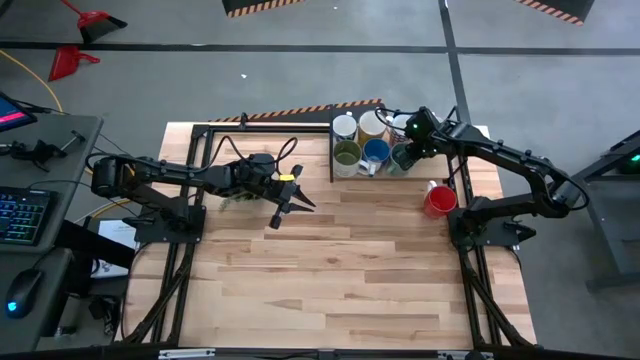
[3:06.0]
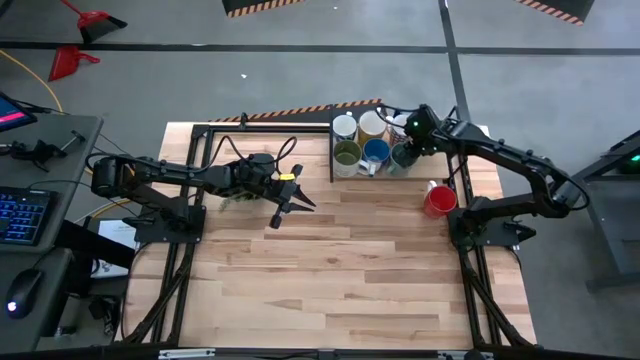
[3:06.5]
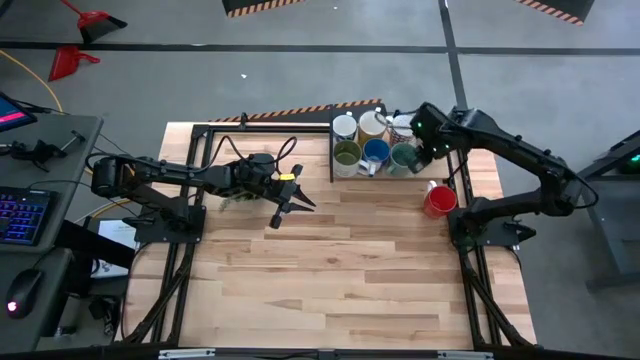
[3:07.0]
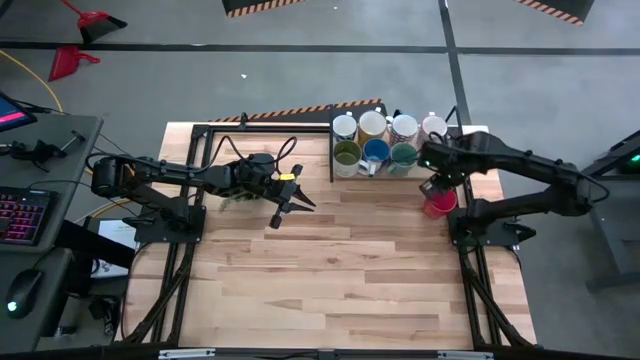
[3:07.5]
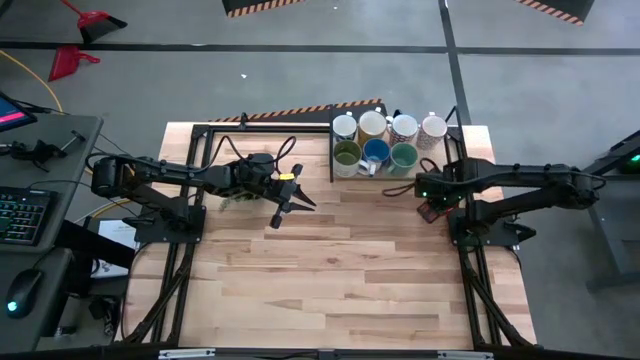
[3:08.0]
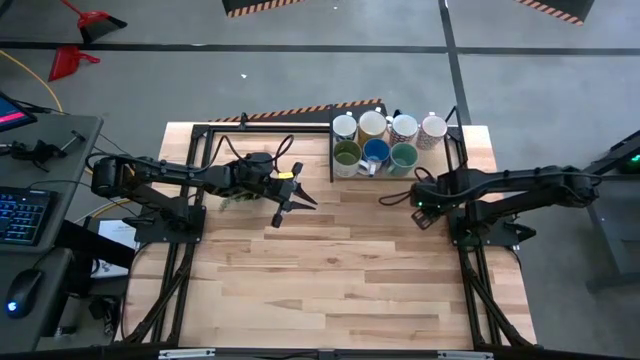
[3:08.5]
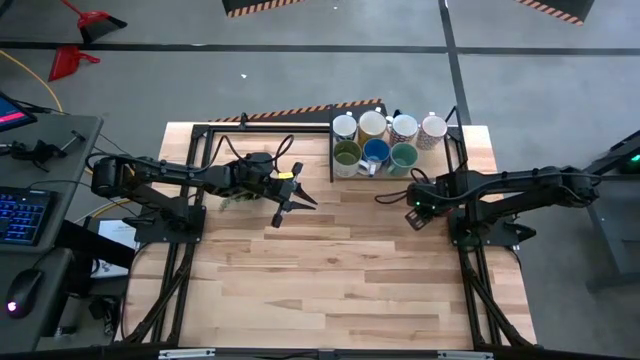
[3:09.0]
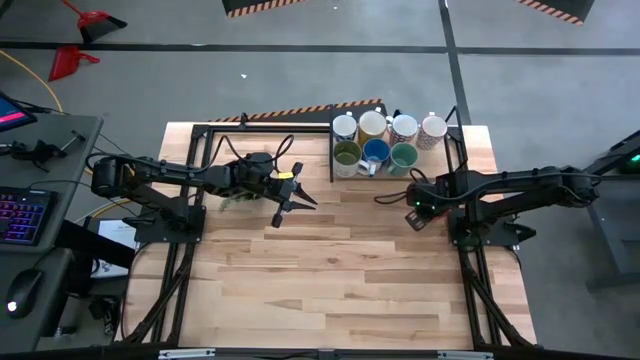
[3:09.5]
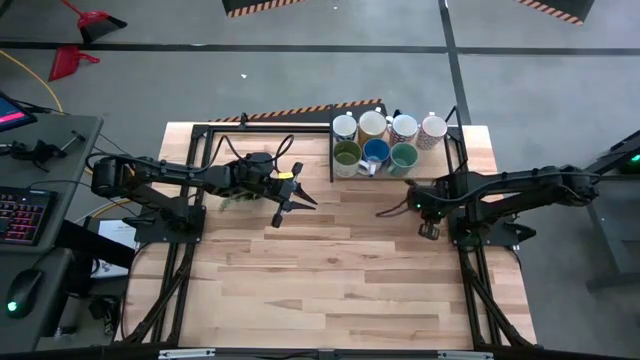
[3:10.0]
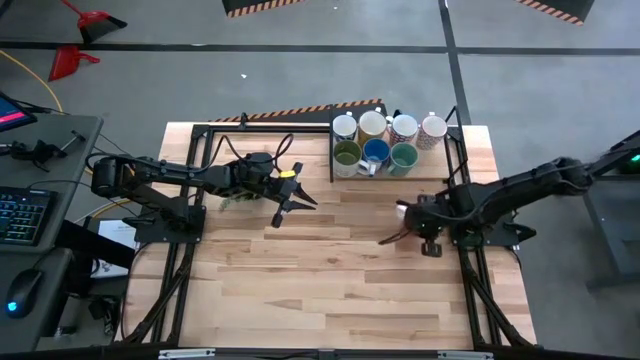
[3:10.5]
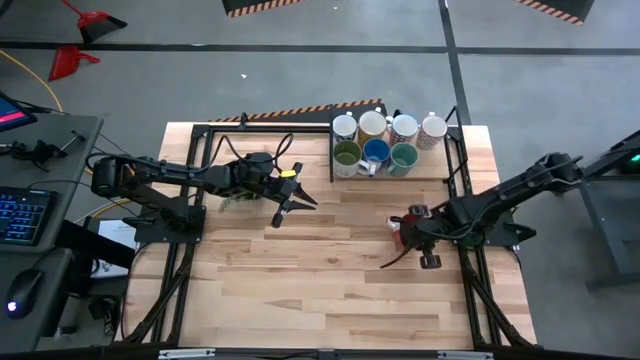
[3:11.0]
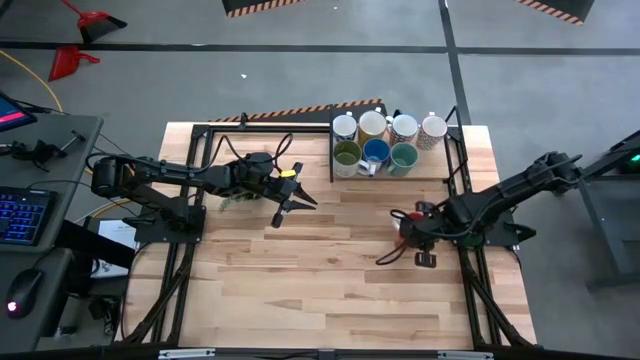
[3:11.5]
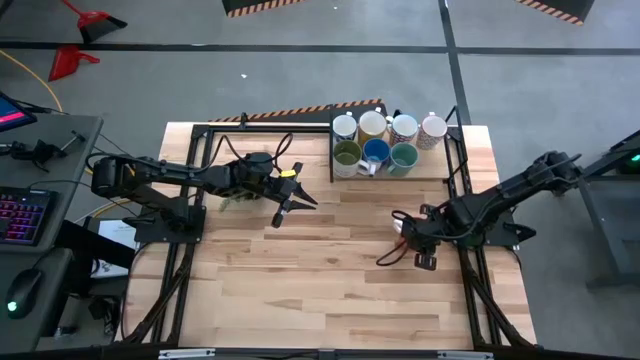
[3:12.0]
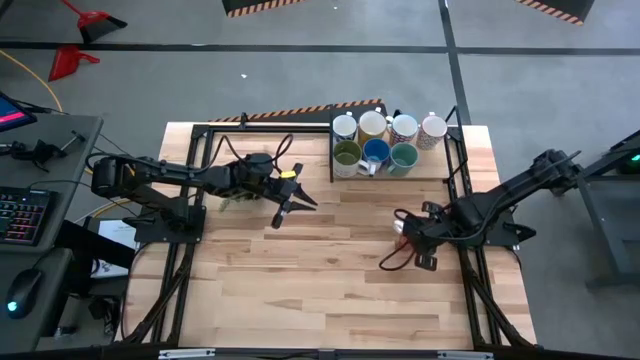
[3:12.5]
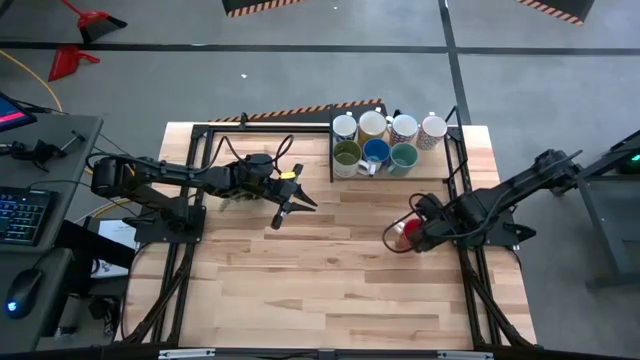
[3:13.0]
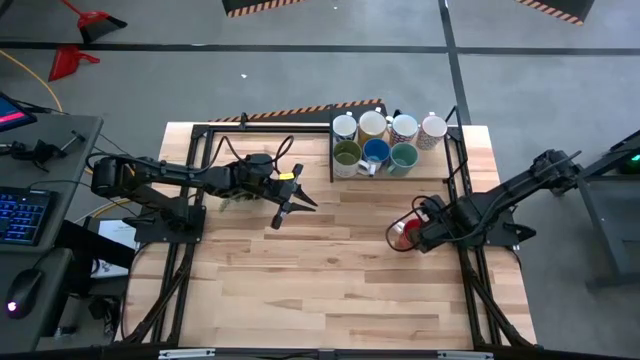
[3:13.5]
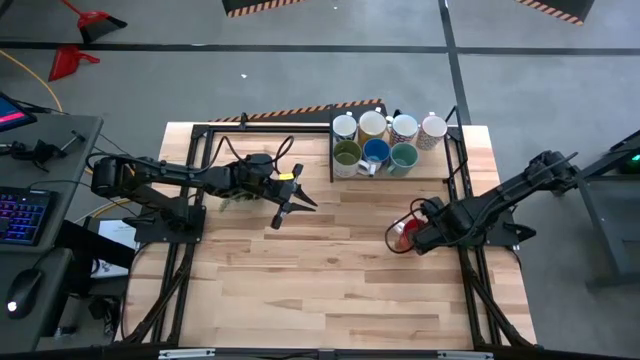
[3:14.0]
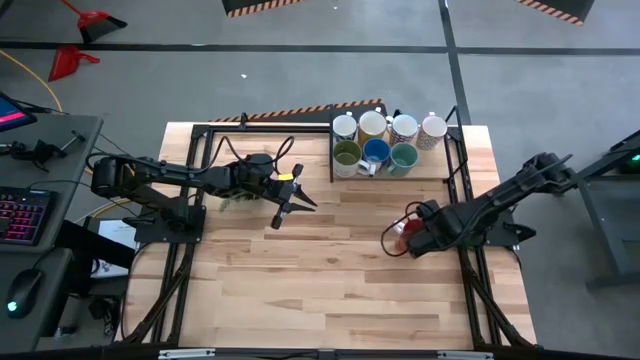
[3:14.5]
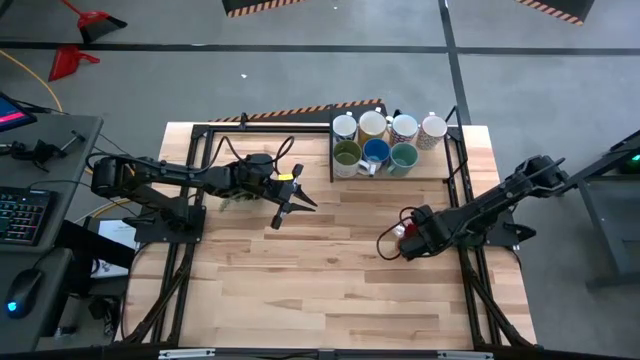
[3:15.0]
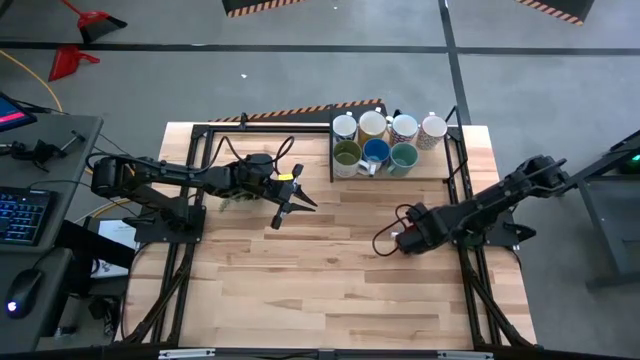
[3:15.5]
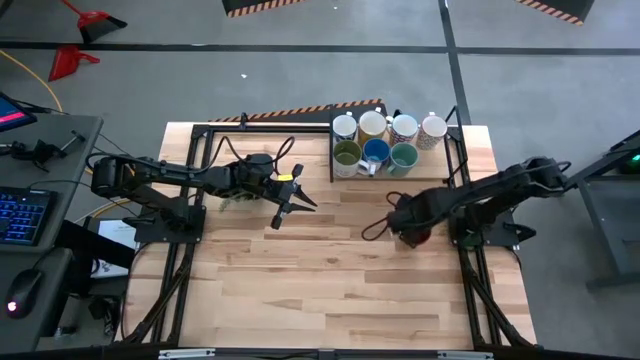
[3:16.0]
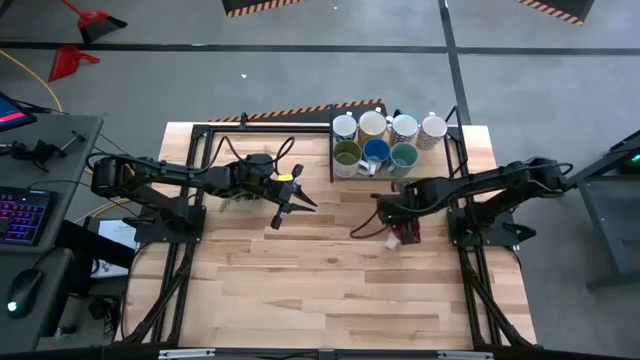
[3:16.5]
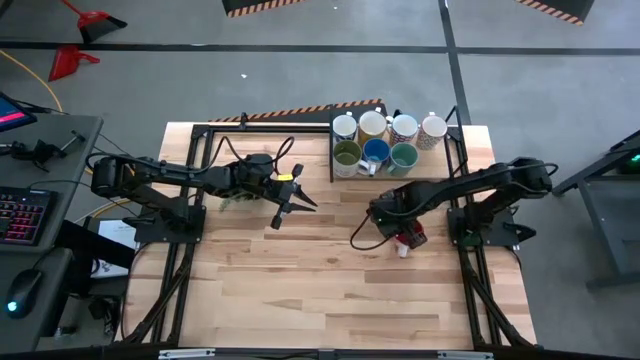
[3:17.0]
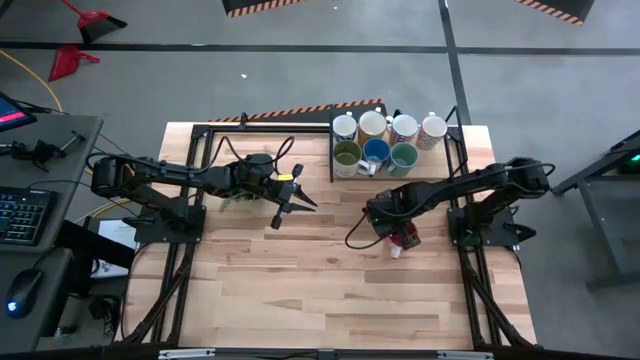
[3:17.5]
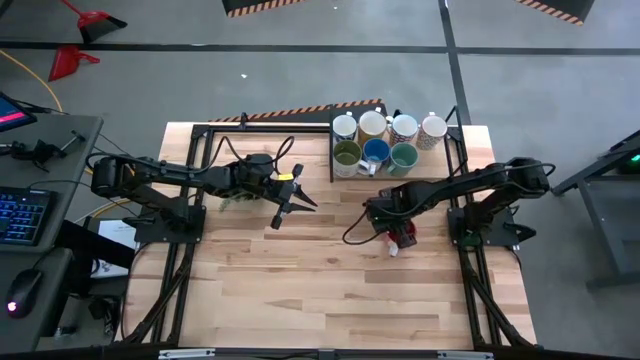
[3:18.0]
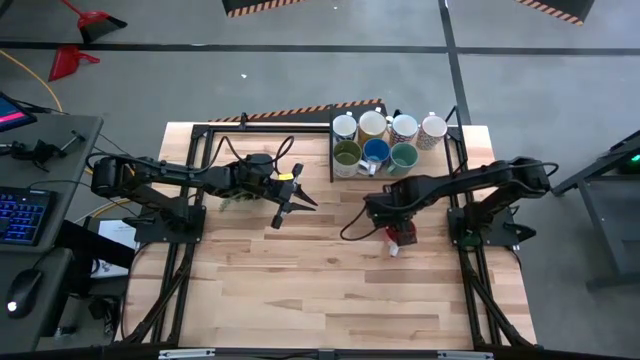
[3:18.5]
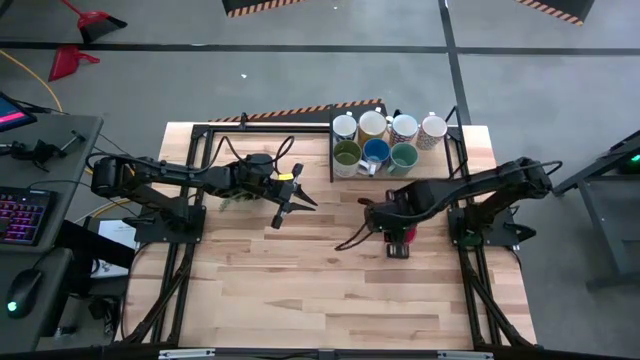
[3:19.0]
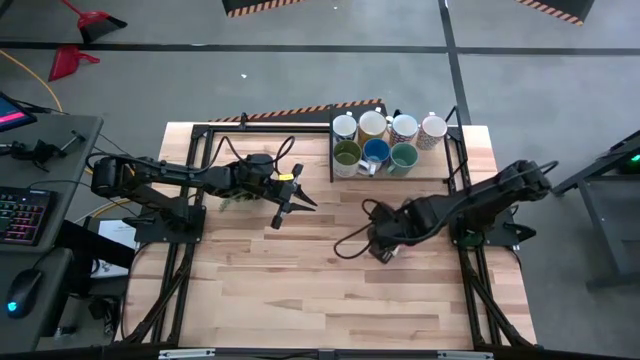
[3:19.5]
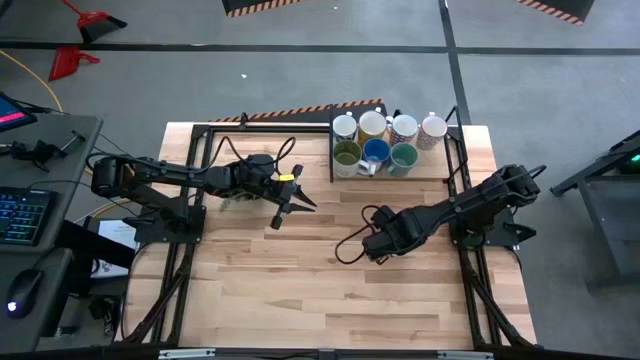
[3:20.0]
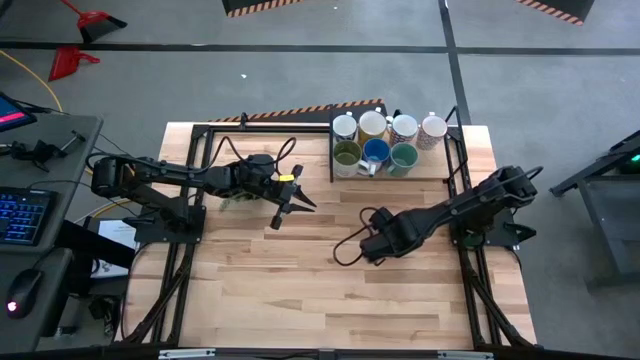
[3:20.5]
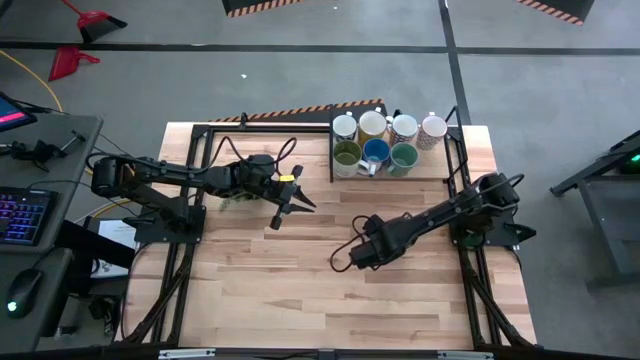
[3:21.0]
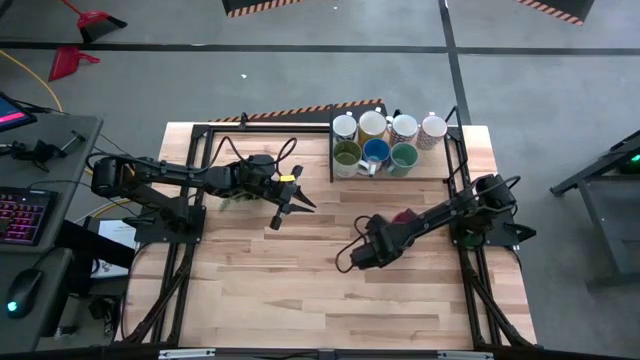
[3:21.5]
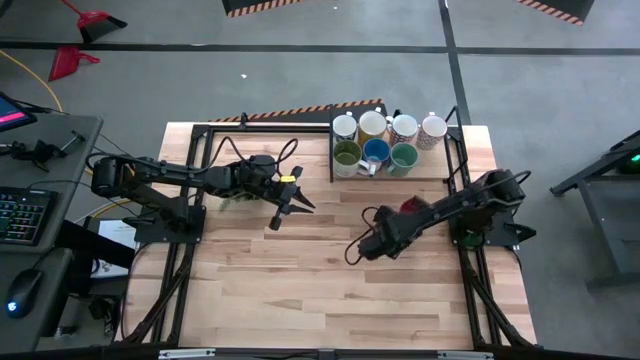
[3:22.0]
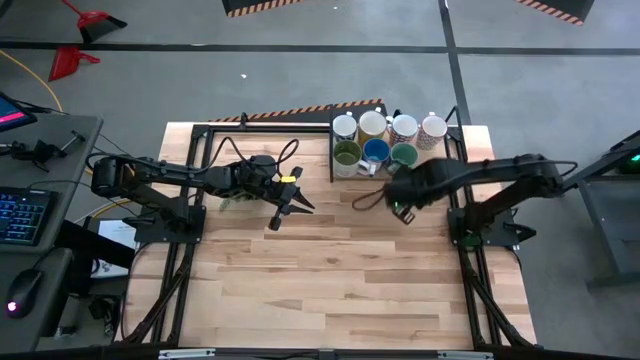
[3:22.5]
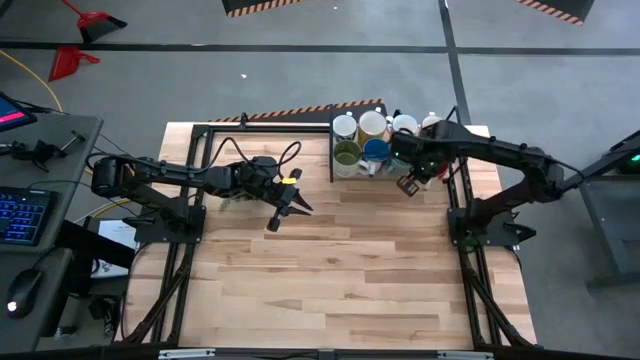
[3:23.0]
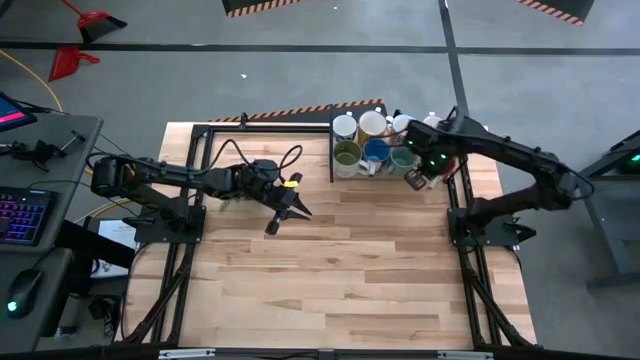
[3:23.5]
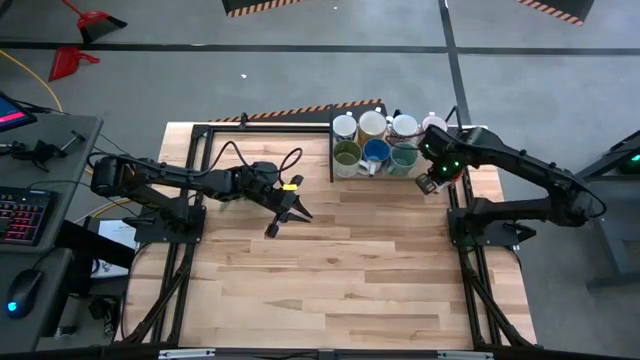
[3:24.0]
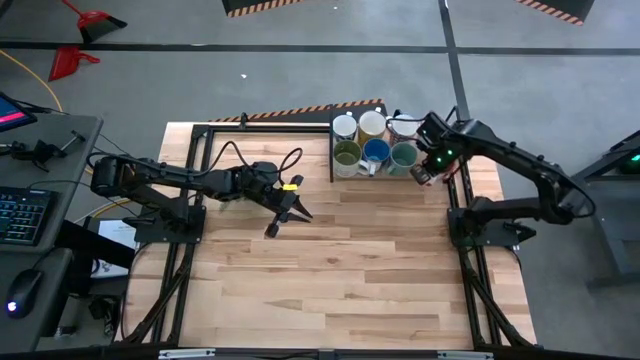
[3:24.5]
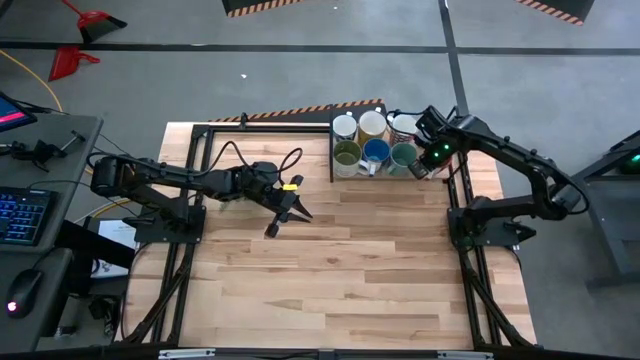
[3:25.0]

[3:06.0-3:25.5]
Task: Place coffee mugs
Put the red mug on the shelf
